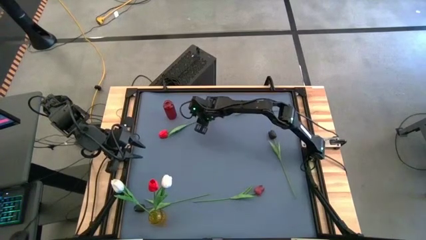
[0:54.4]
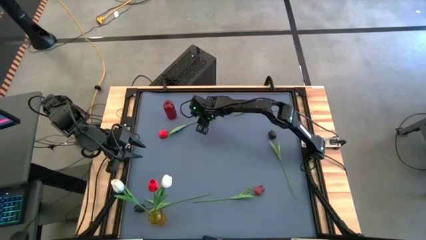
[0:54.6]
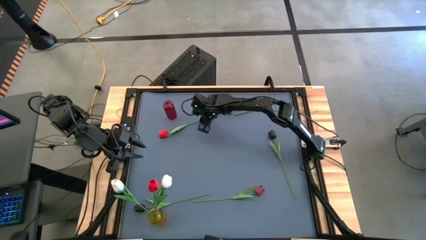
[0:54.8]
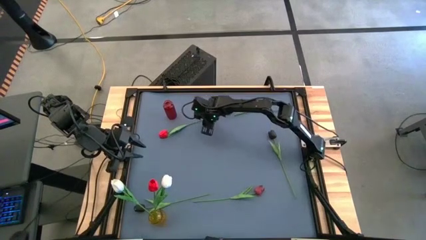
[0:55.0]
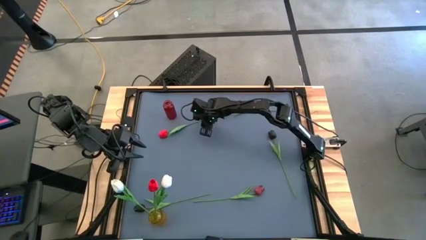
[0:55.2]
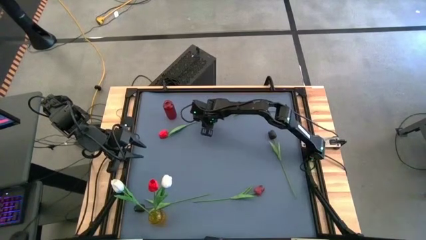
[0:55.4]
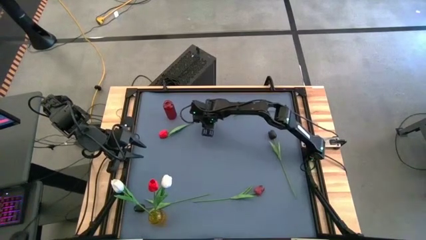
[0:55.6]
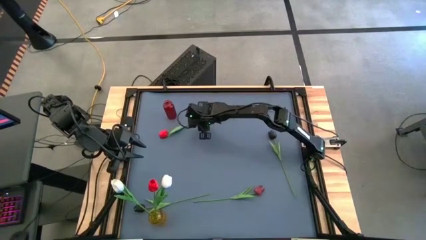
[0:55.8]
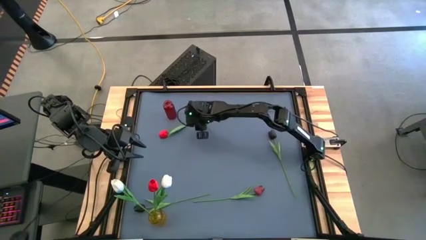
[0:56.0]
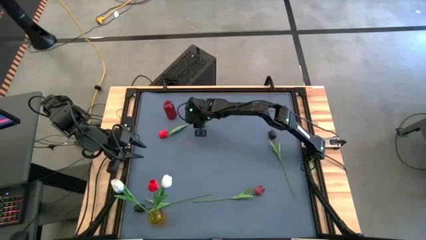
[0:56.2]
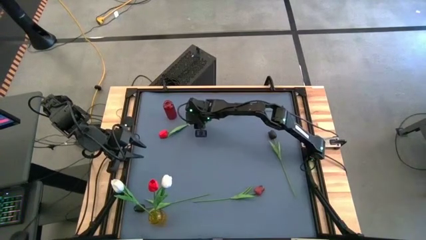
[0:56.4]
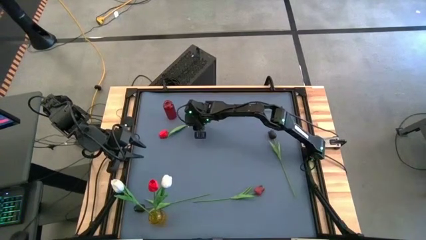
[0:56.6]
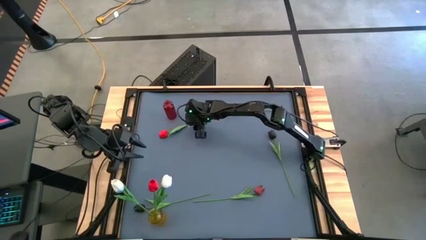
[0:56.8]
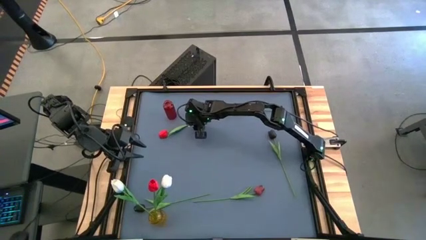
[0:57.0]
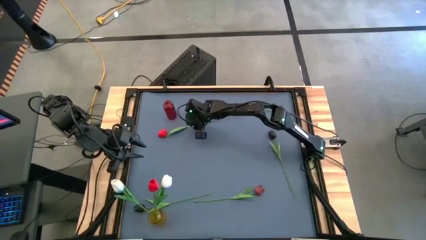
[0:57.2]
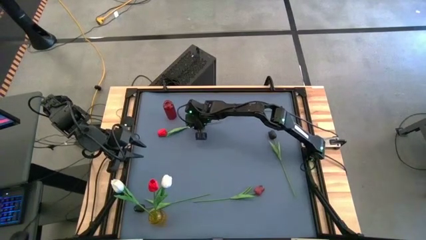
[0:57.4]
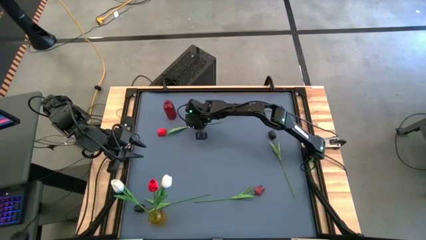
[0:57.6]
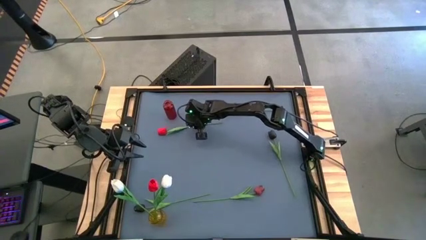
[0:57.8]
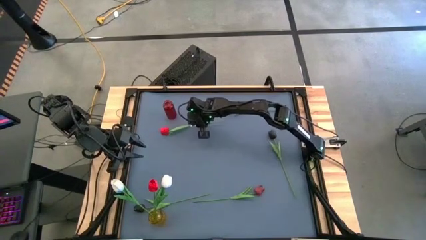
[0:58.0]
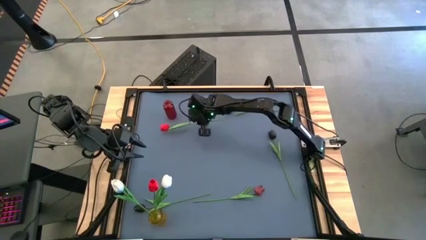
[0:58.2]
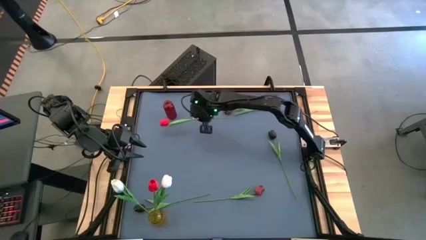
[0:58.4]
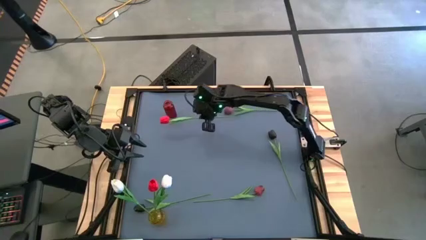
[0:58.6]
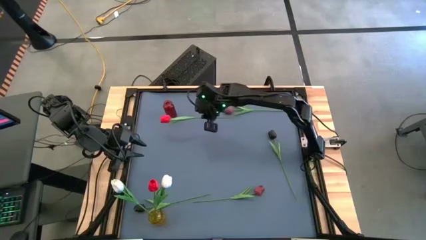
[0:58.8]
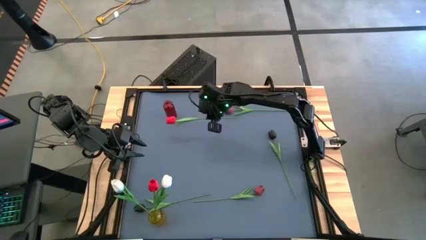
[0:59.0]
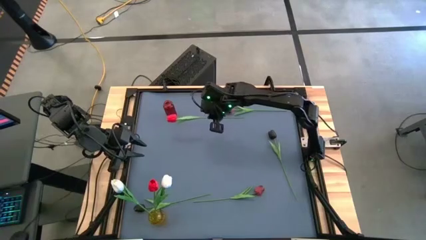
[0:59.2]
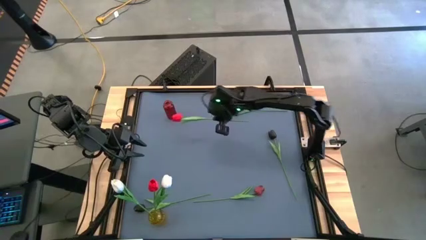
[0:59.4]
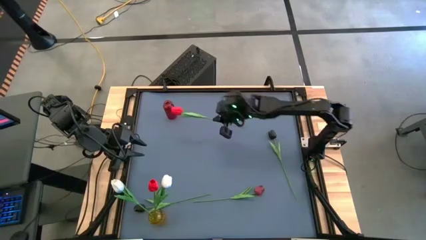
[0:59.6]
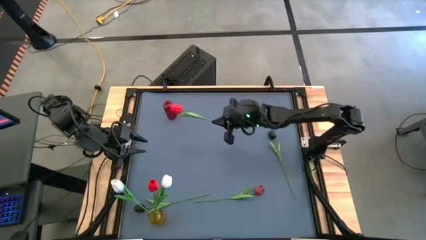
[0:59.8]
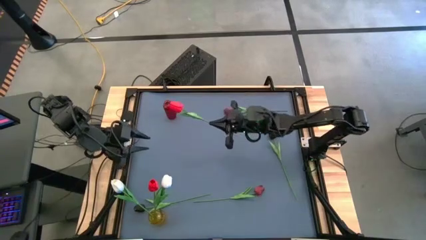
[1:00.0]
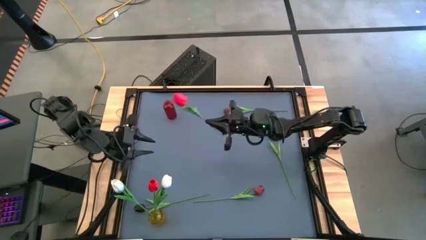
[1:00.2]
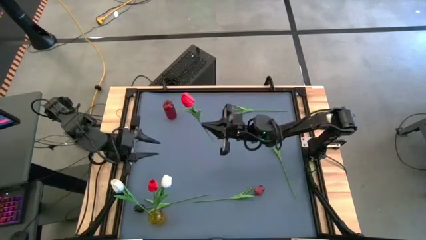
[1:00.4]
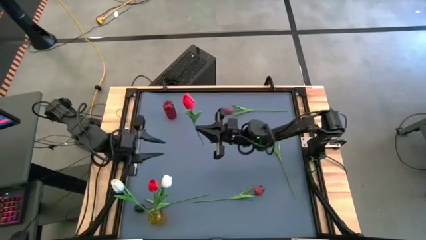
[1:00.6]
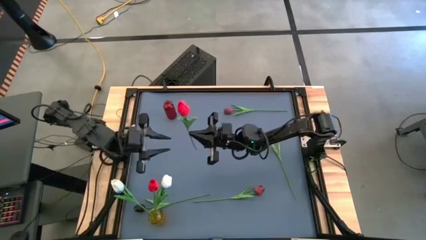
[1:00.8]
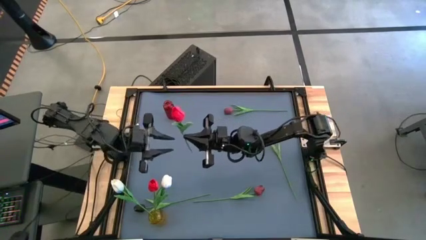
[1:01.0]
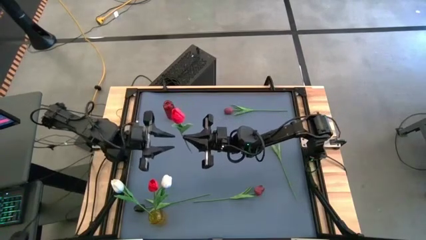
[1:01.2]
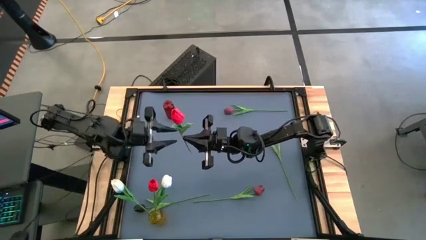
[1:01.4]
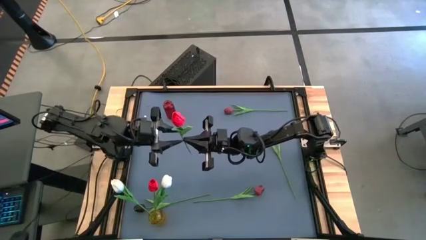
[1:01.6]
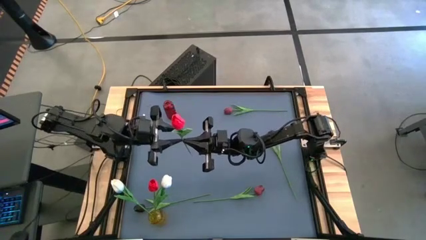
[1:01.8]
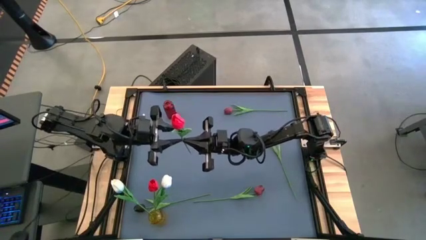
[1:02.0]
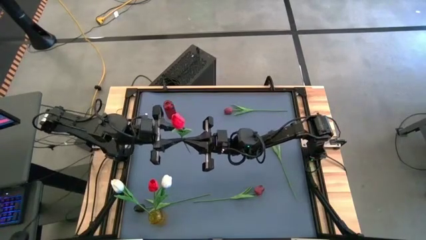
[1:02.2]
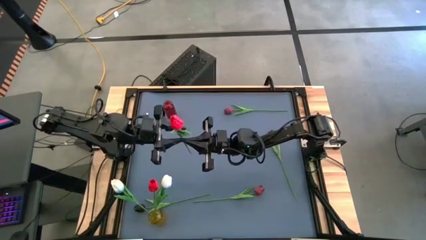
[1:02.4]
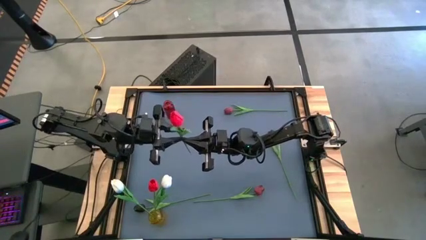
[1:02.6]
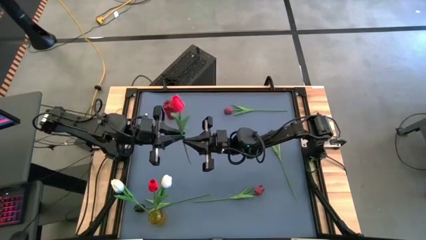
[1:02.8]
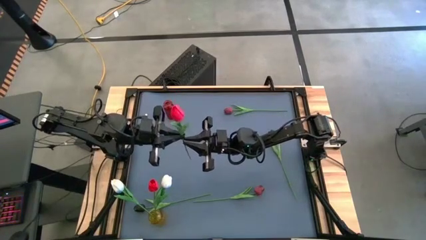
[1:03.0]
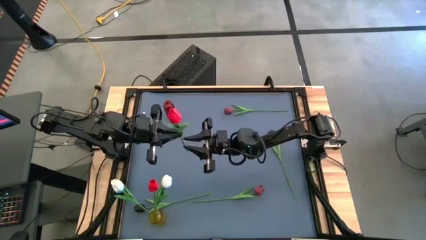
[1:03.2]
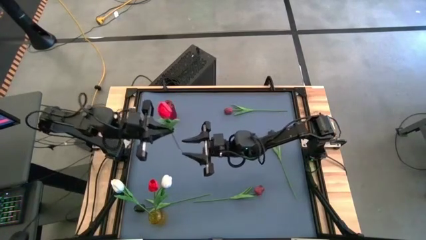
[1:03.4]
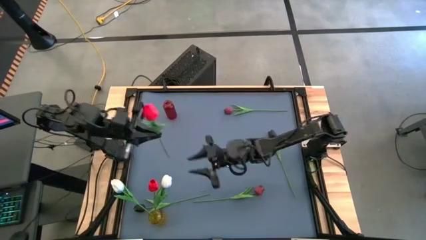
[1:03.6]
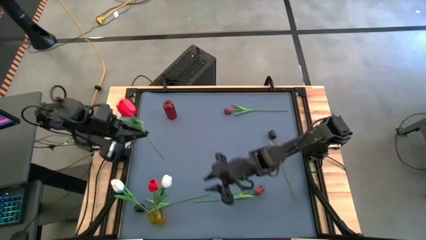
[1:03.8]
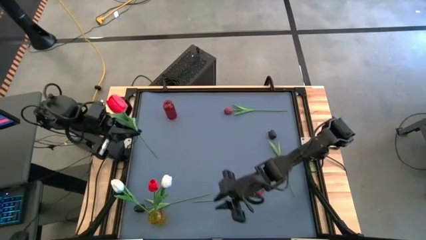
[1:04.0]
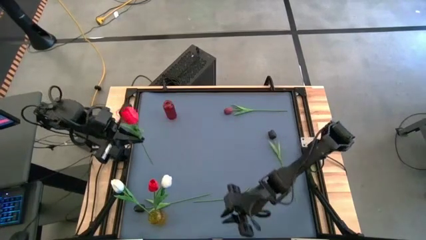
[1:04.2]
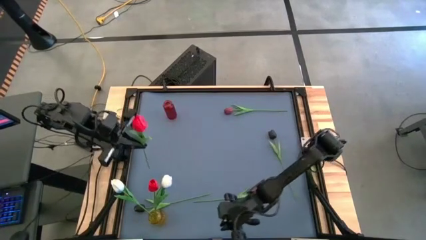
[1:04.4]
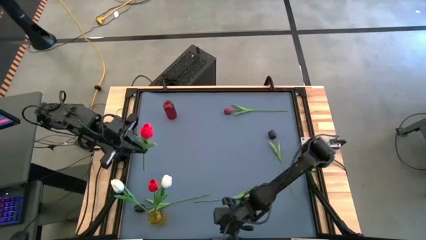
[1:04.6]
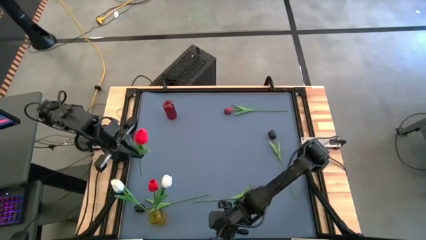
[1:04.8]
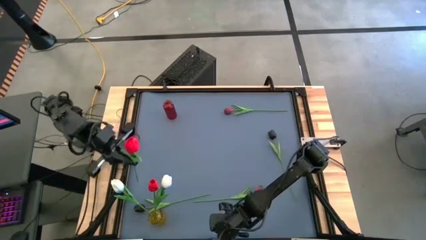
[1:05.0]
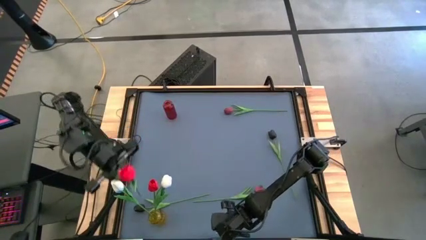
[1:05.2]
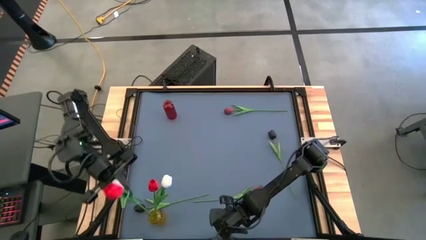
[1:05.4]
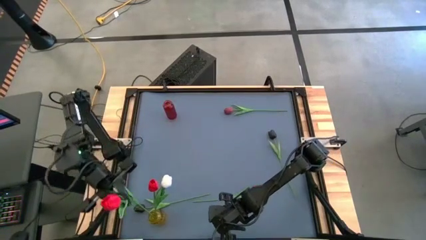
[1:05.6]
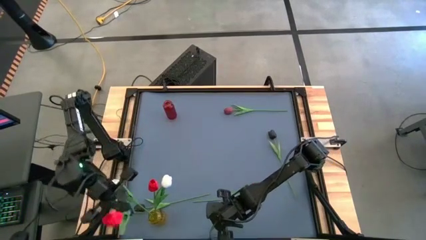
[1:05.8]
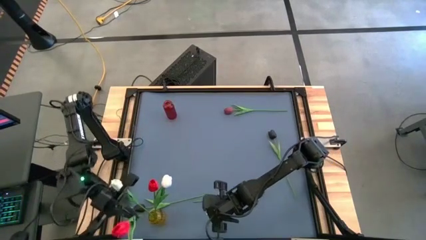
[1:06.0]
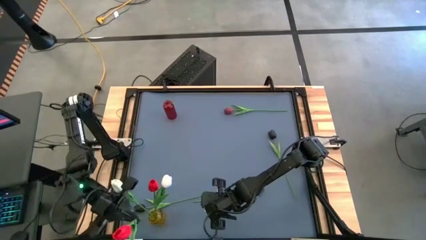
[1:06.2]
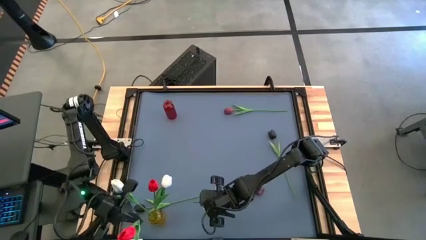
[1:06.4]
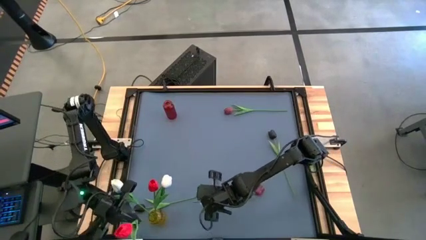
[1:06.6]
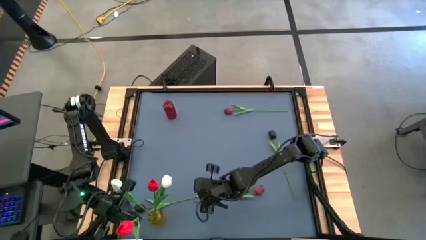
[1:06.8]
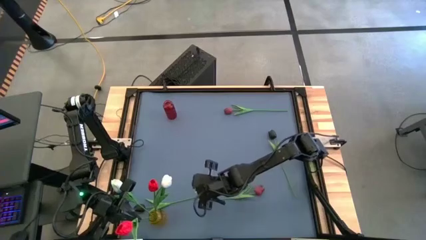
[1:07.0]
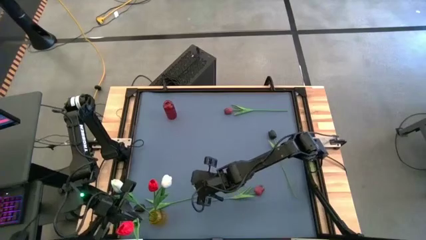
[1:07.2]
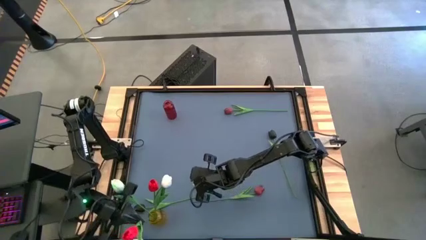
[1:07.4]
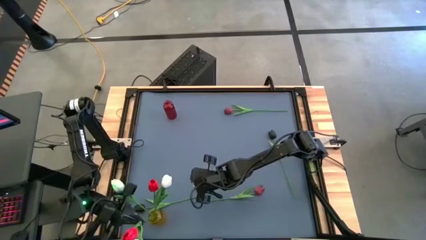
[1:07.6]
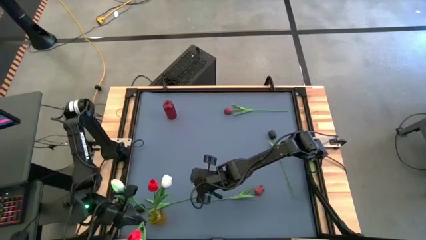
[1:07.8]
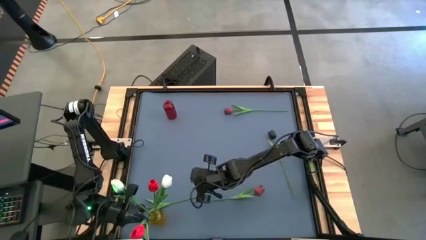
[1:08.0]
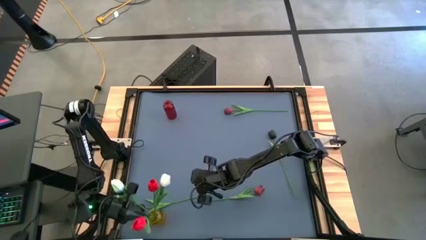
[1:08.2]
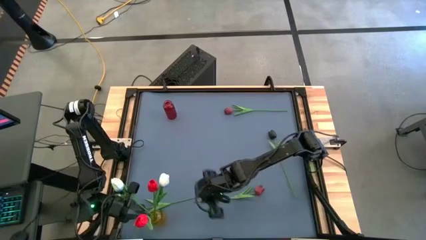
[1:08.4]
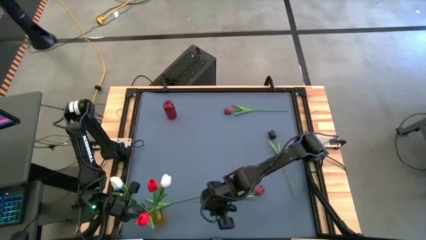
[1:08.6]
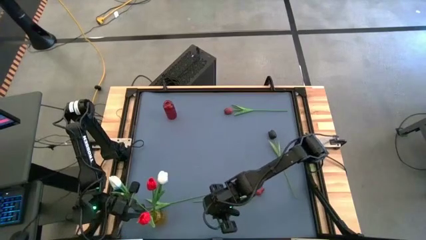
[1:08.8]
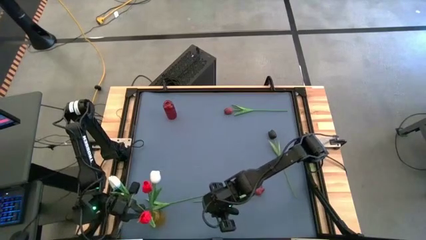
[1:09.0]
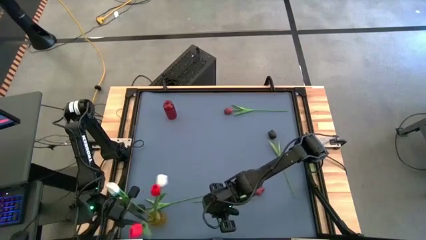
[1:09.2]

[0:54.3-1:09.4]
Task: Sort flowers into vase by color
Put the red tulip into the yellow vase
